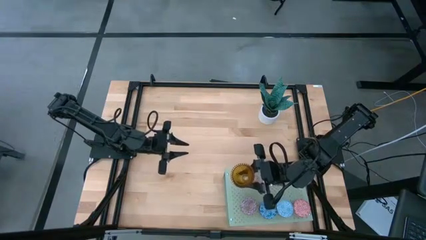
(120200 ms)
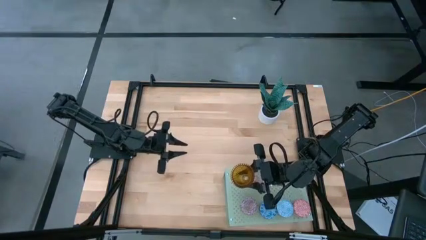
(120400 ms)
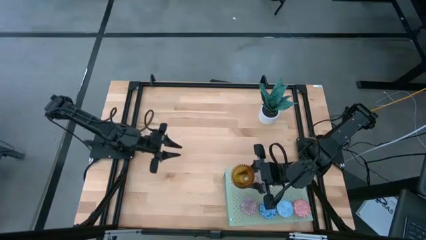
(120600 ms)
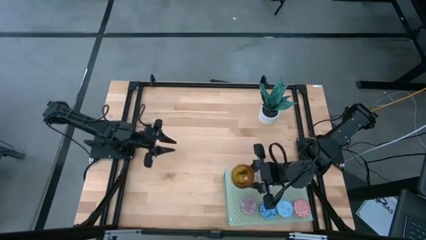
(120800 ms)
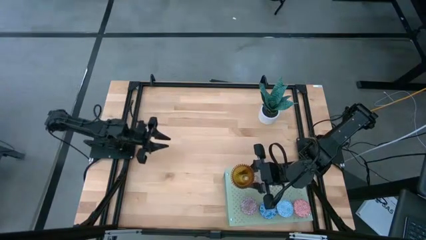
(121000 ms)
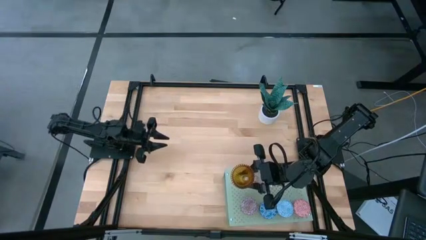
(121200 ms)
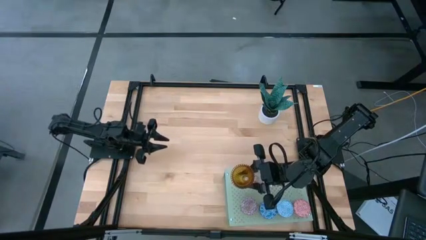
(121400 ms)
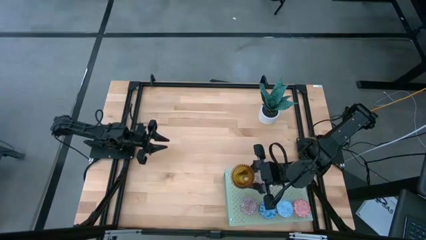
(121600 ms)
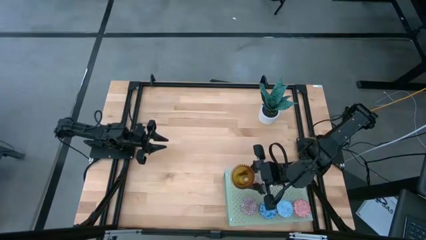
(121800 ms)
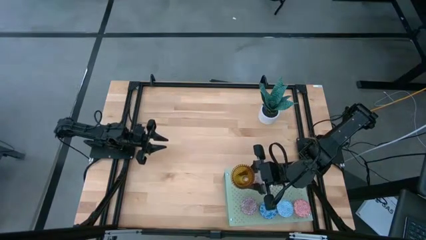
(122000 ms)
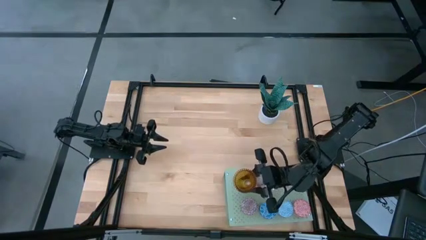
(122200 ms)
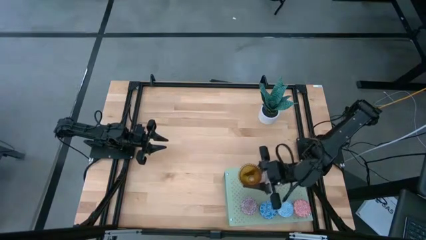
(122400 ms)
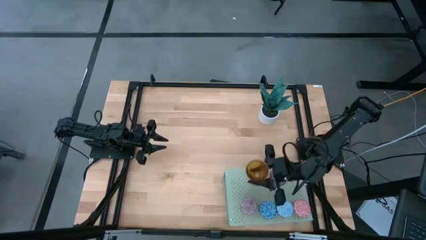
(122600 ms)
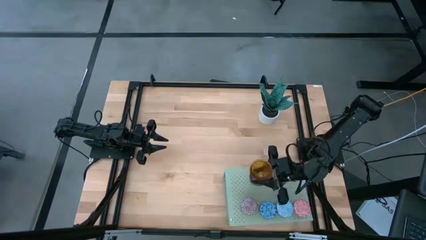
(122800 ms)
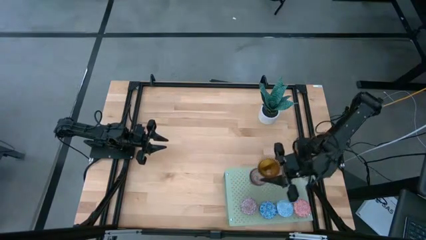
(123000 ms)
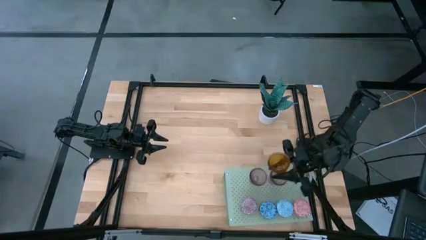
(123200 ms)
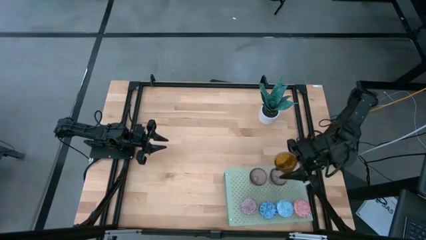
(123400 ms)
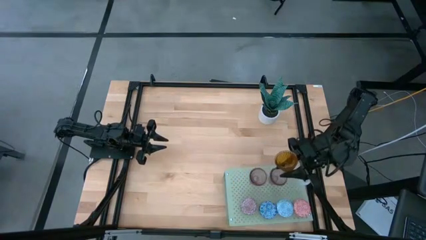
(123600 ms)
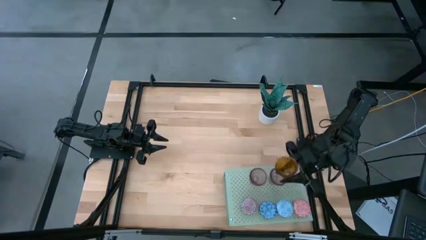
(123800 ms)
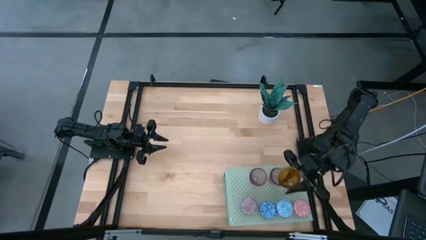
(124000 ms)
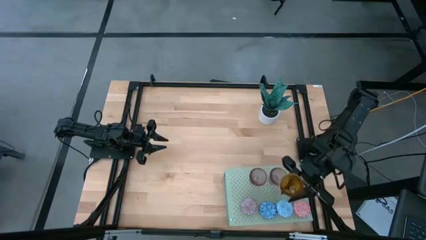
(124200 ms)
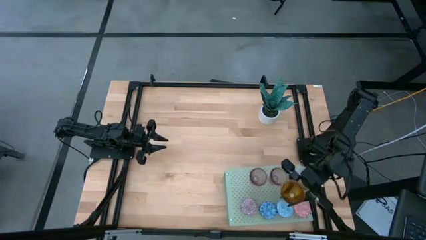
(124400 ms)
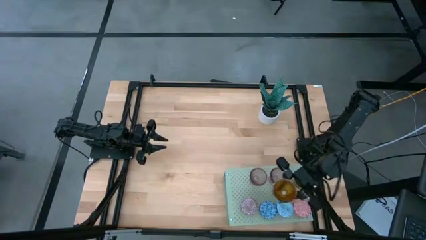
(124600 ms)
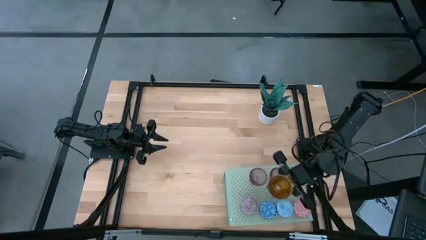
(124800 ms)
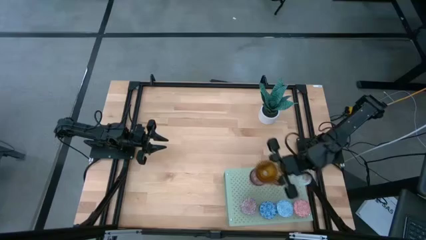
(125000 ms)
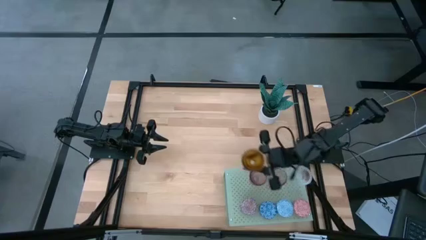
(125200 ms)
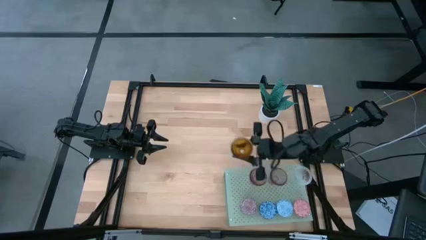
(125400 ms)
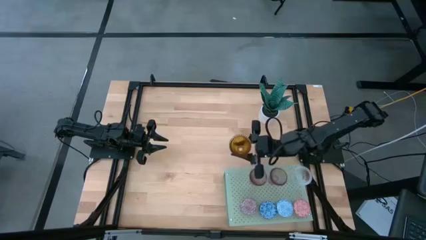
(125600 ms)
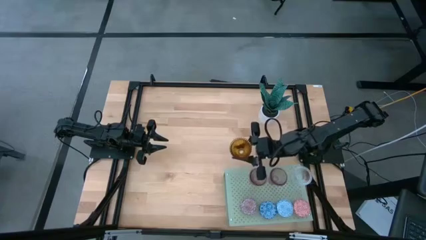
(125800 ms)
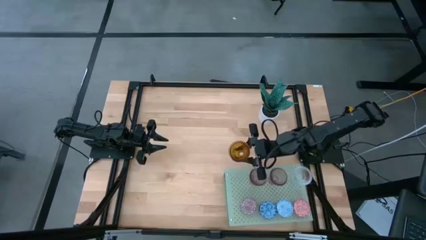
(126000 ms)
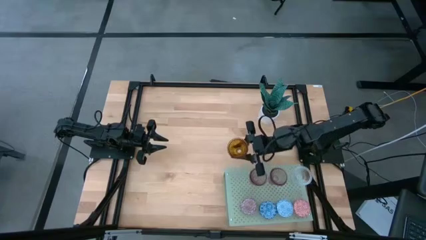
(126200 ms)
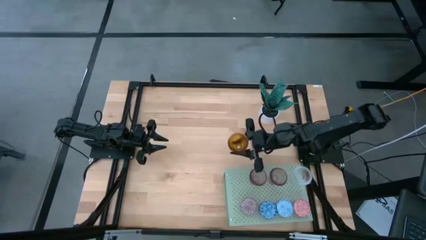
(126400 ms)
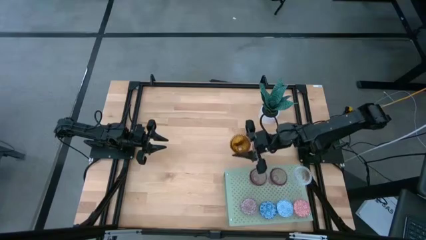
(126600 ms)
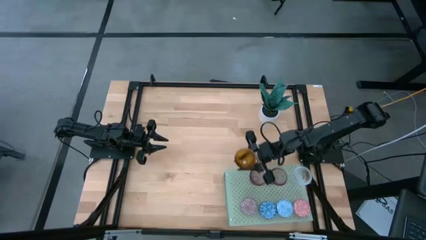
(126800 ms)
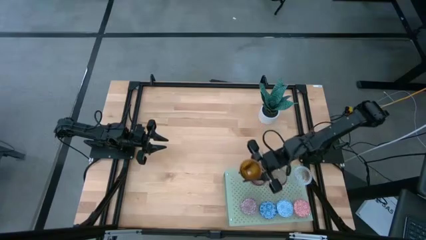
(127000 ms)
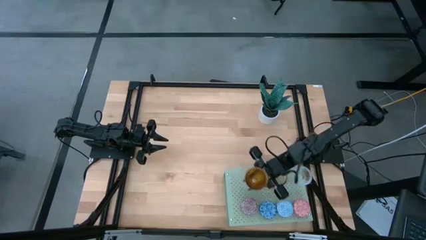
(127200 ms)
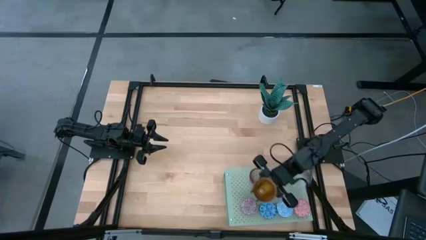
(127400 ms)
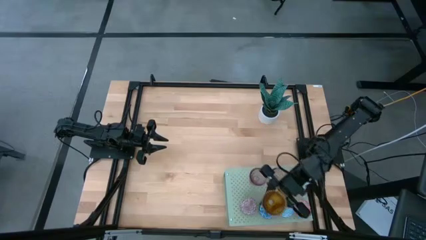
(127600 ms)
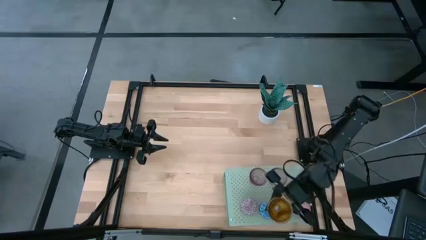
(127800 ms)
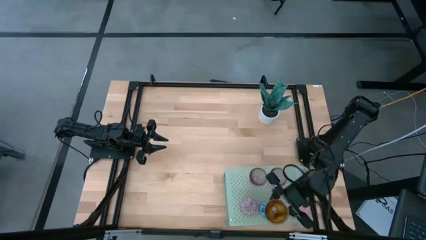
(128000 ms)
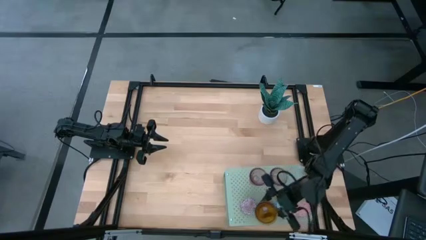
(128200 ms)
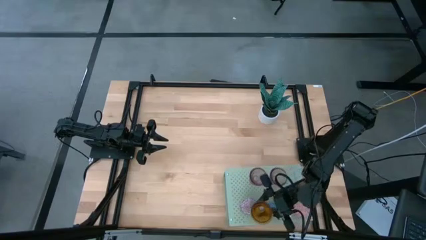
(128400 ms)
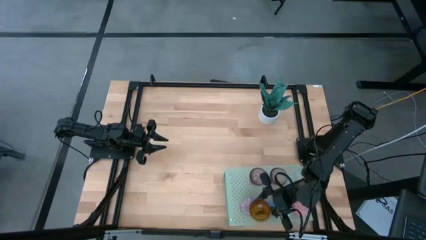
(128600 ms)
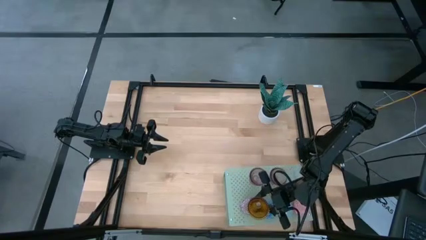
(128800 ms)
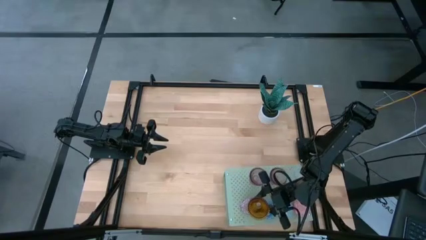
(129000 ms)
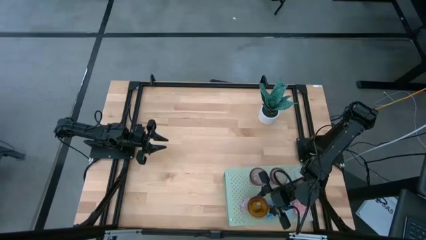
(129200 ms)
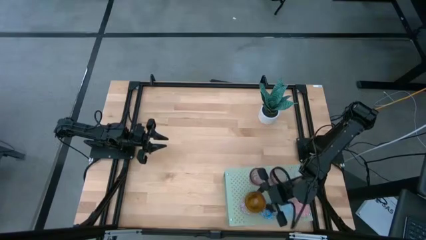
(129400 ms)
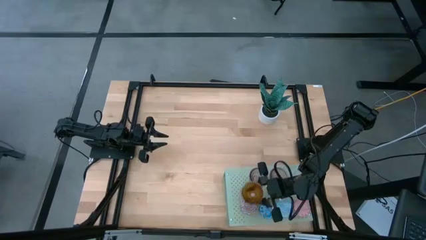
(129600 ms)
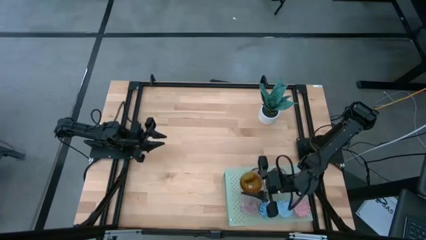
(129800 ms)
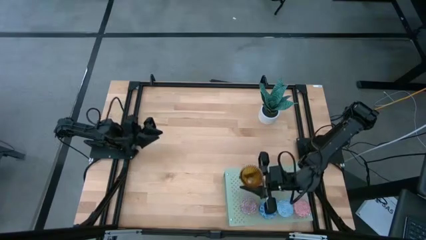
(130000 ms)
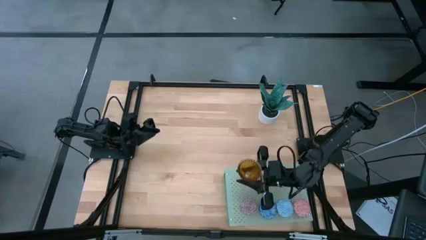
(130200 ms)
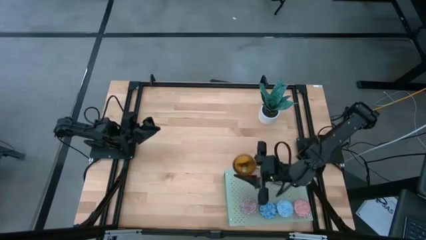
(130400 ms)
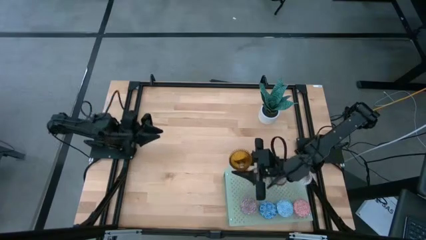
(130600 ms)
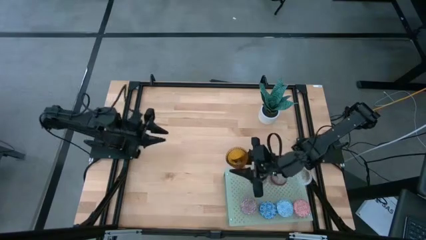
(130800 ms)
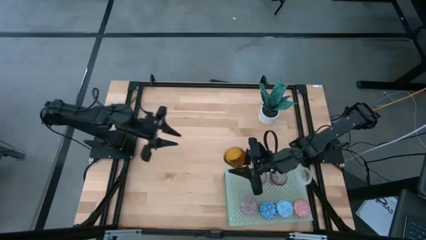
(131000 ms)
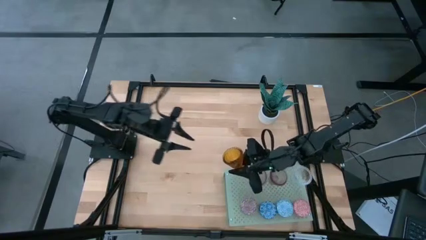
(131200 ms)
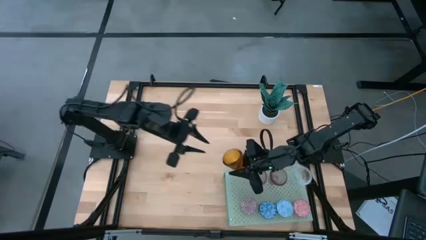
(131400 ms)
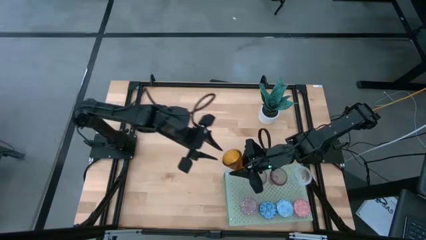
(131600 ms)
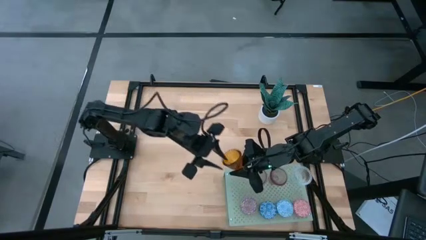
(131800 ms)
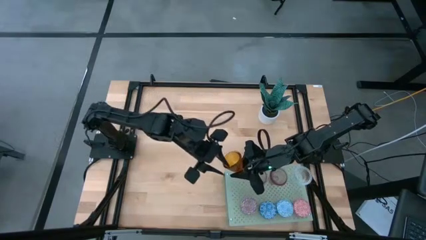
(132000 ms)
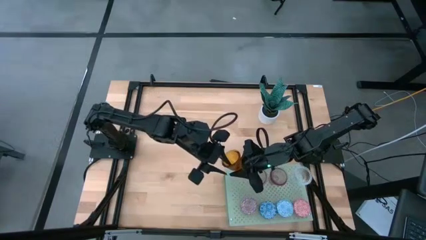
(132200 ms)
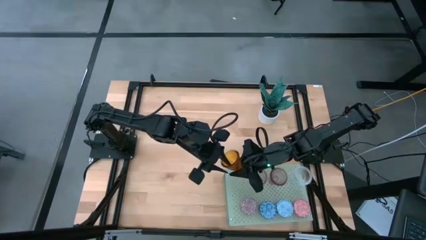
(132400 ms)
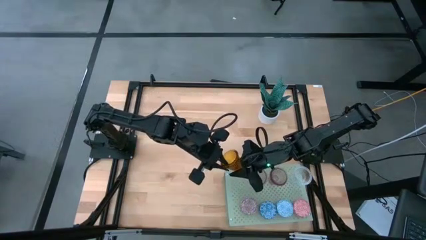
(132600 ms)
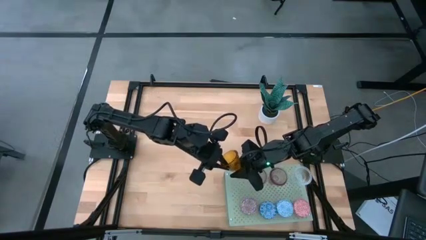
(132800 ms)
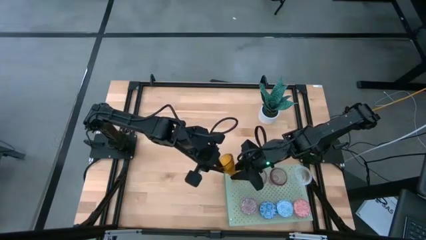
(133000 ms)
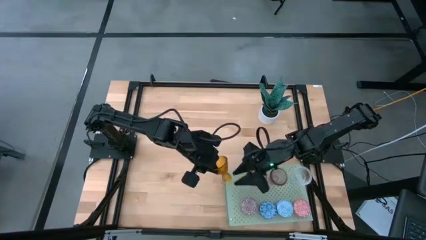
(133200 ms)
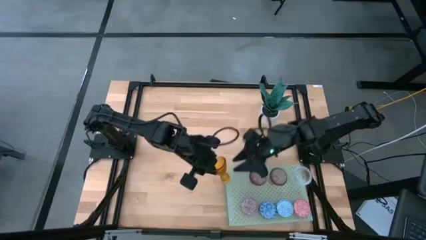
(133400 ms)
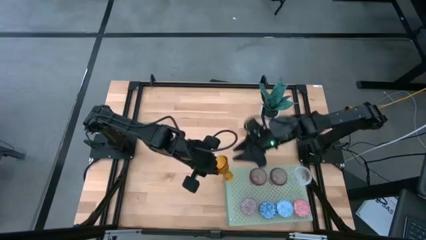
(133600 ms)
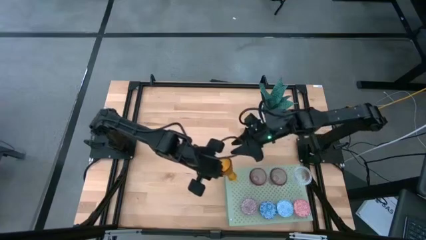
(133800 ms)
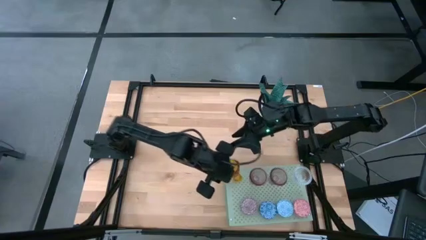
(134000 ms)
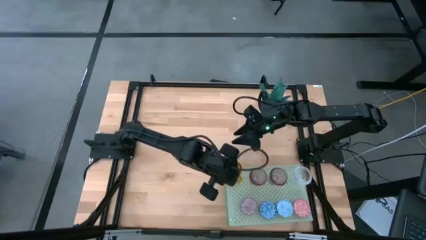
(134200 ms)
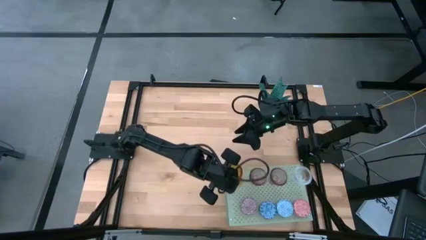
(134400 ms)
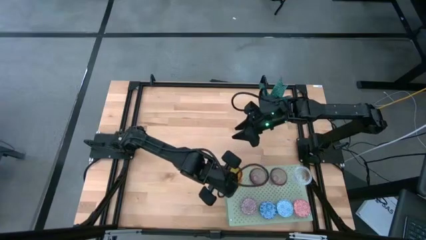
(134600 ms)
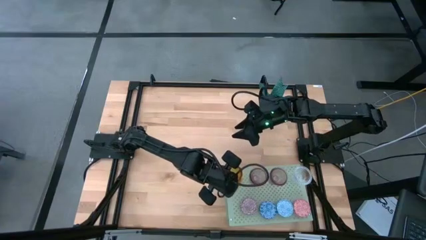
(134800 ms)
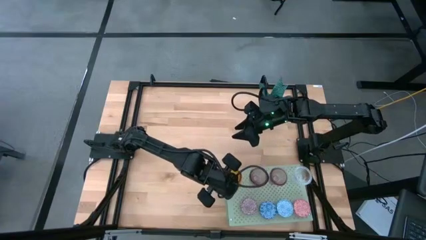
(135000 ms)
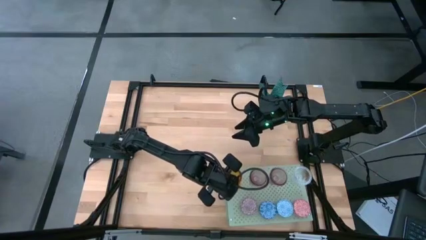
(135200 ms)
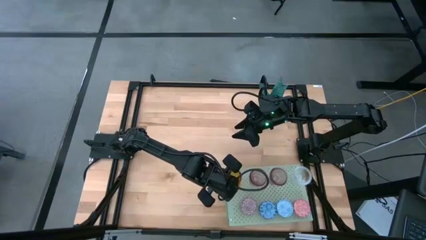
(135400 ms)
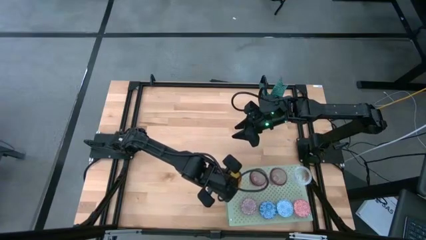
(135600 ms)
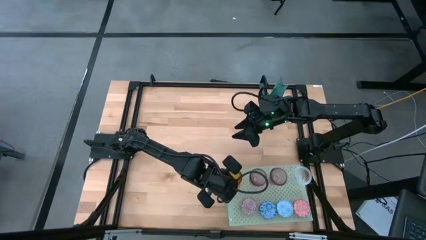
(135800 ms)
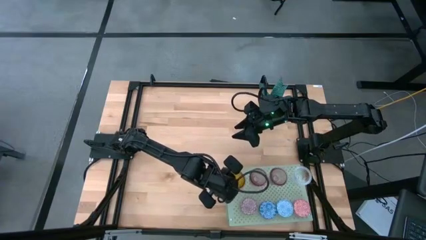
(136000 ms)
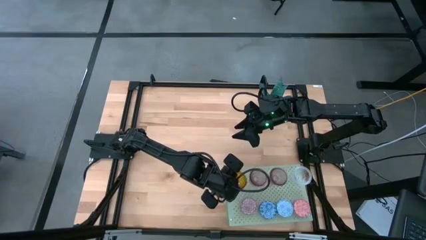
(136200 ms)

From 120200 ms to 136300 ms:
Task: Pick & Place candle stick holders
Put the brown glass candle holder on the shelf

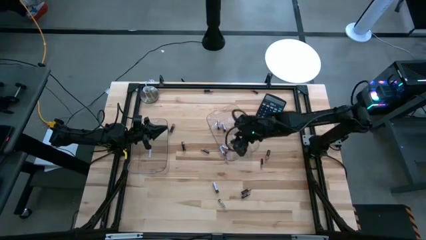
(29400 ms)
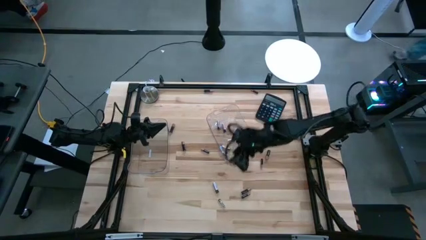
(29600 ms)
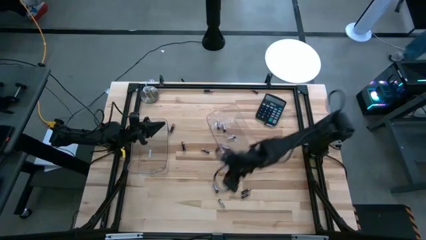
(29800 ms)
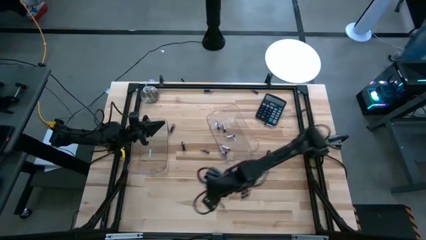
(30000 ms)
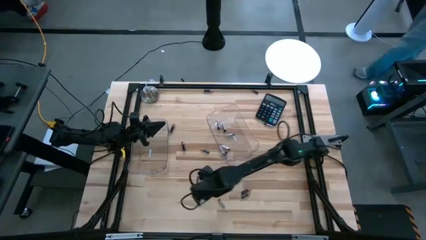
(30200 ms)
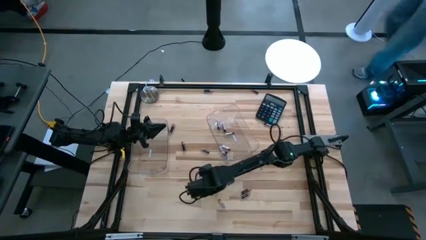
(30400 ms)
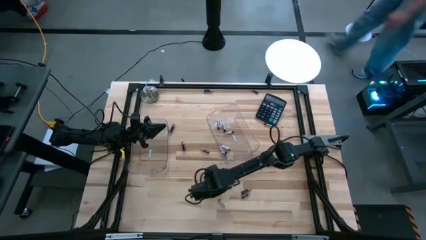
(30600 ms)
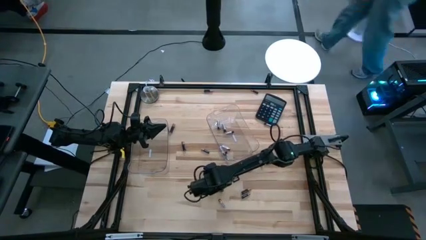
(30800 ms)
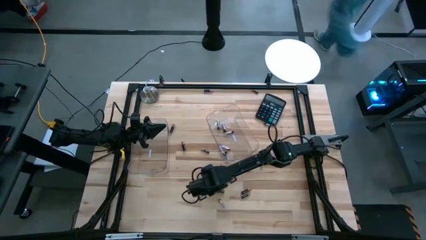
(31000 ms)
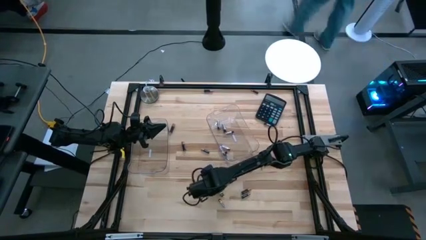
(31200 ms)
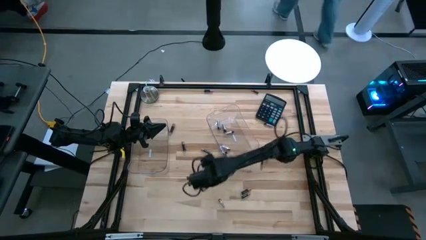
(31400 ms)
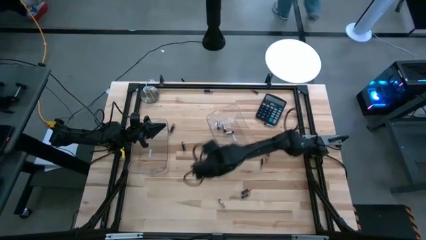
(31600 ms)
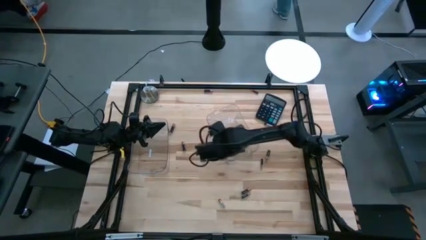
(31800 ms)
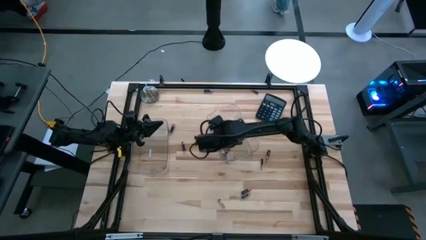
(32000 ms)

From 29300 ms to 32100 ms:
Task: Sort batteries
Put the silver battery into the right transparent bin
